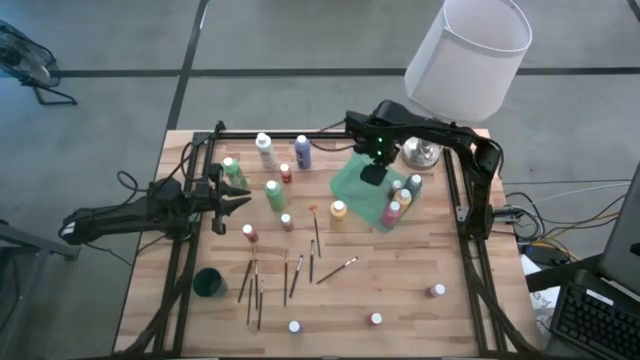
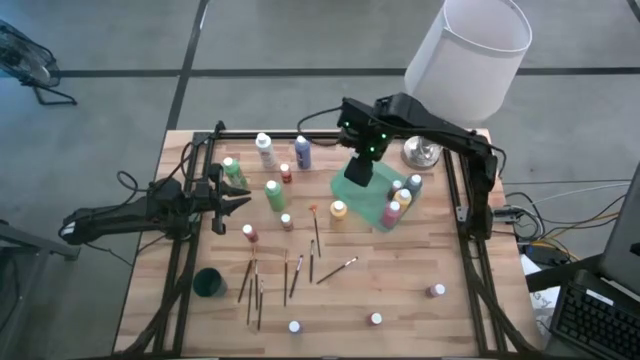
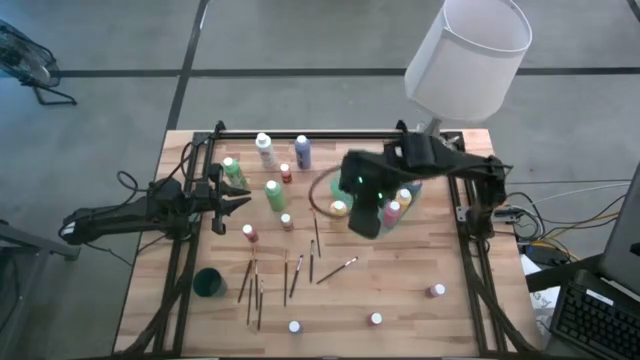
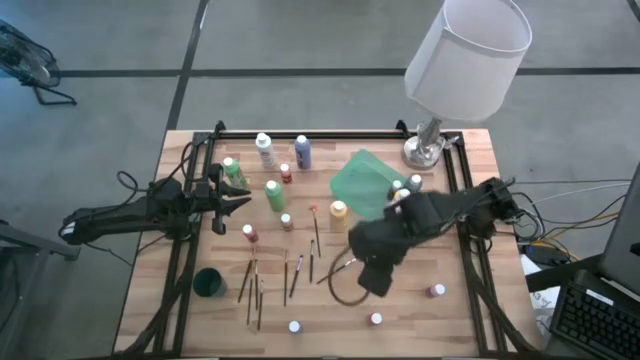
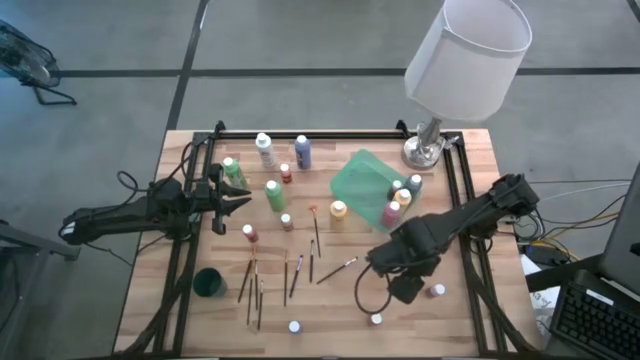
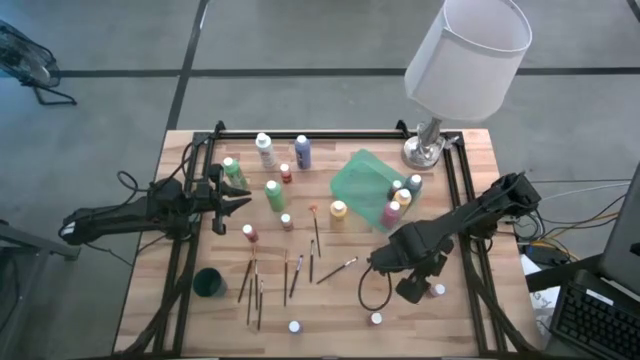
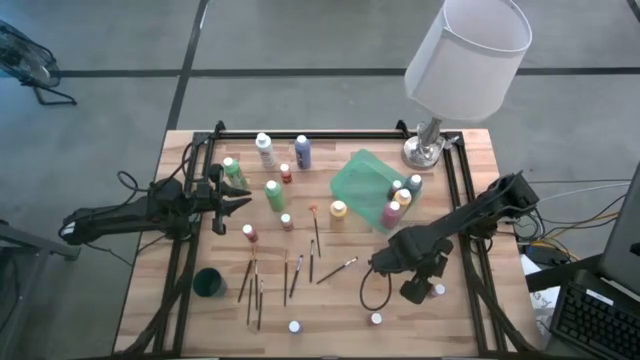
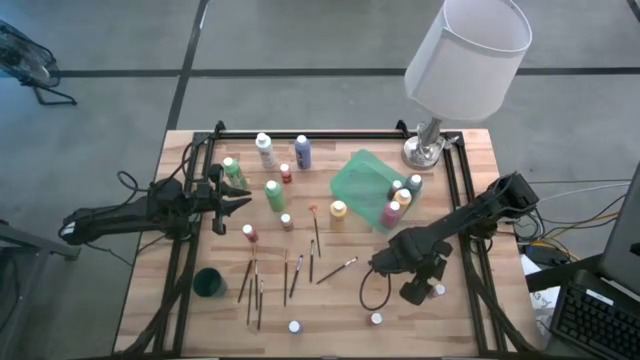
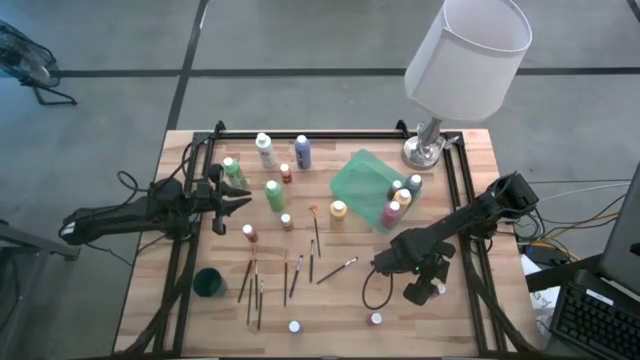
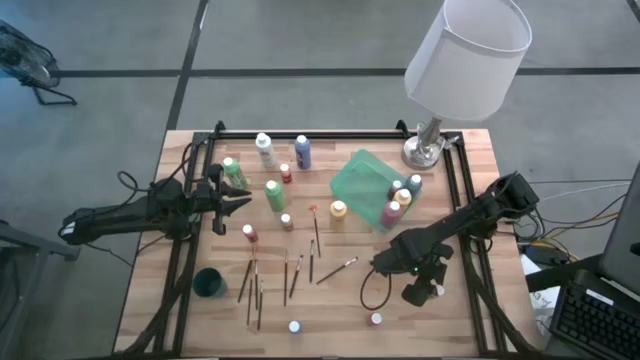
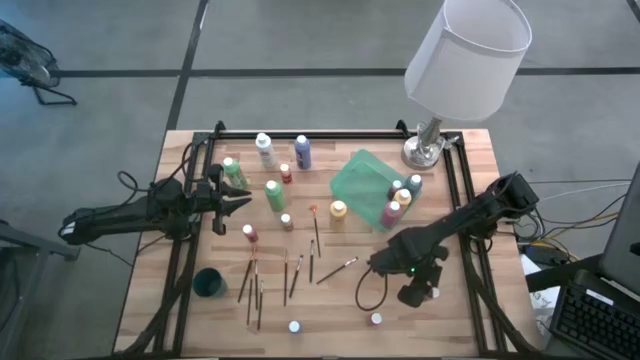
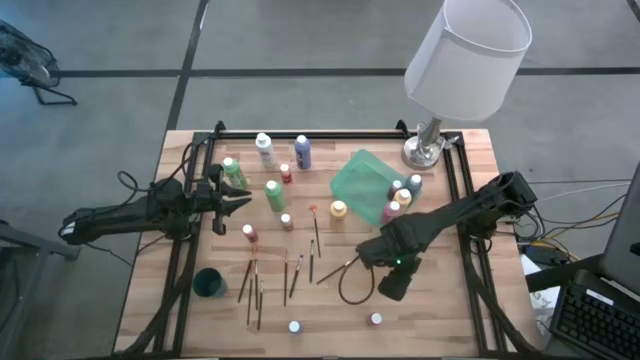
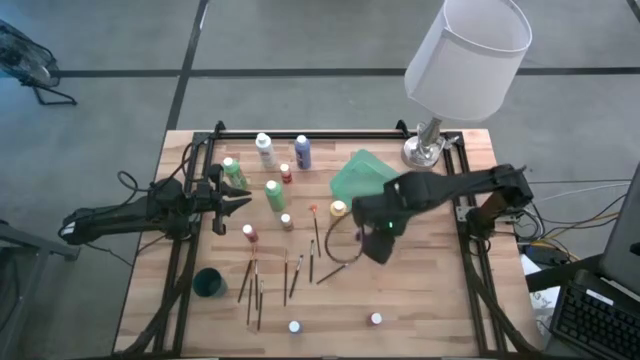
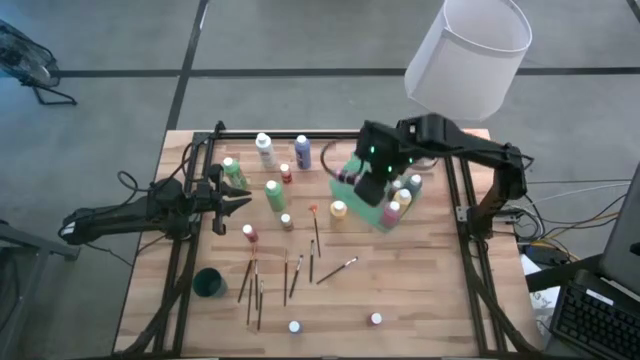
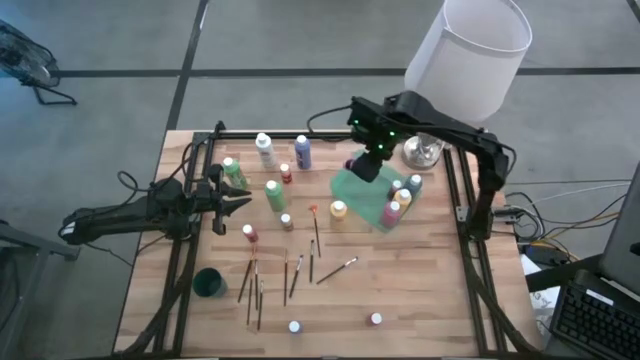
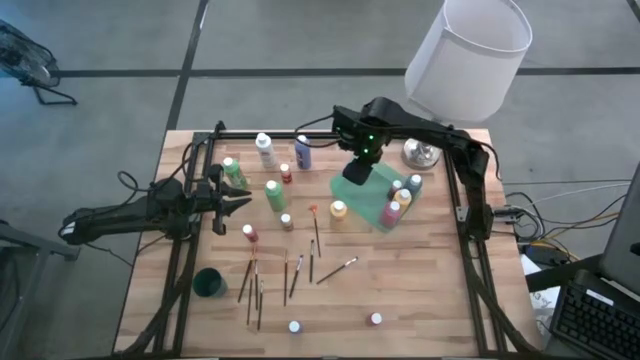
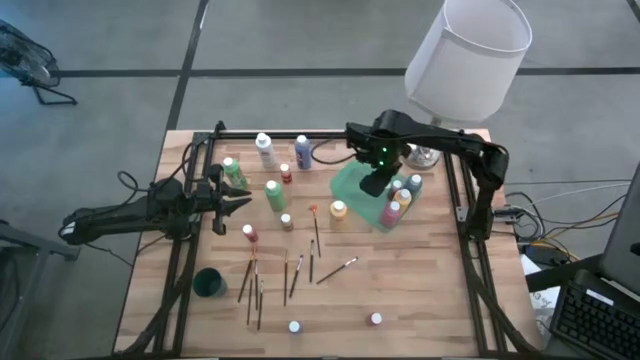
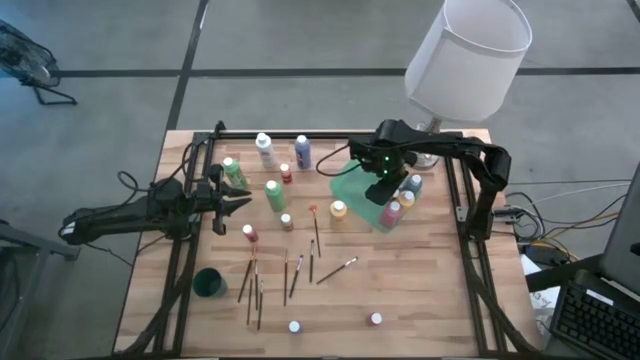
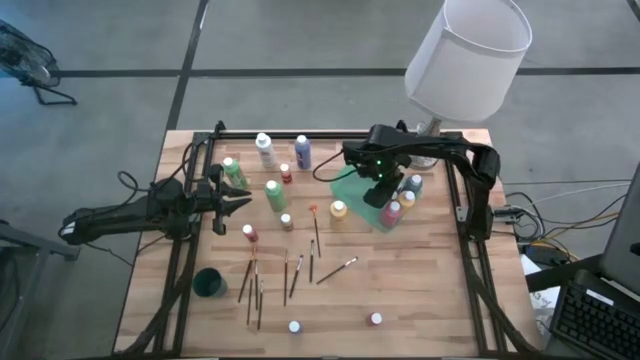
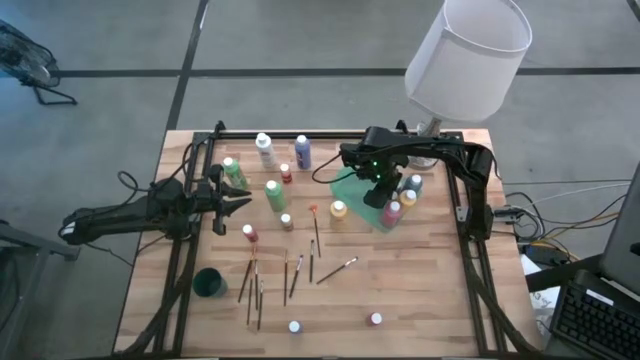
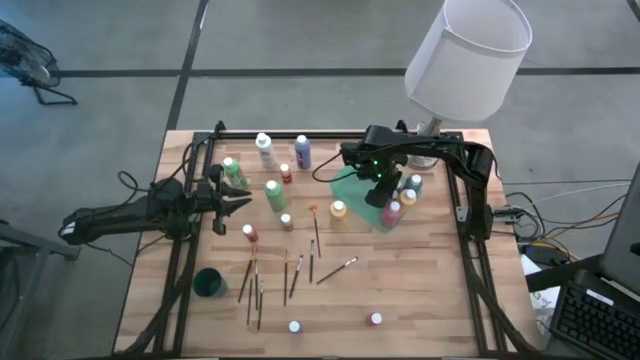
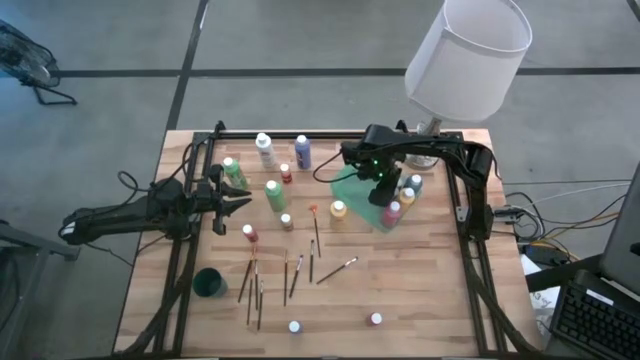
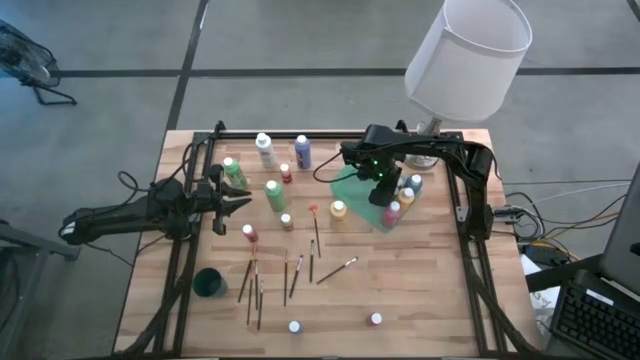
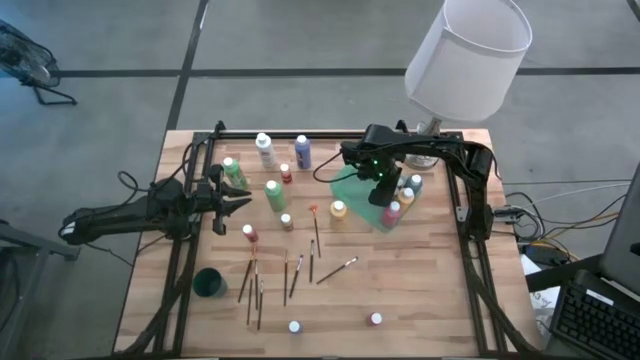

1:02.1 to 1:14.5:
Task: Pick & Place Paint Supplies
Put the small light pink paint bottle into the green bin

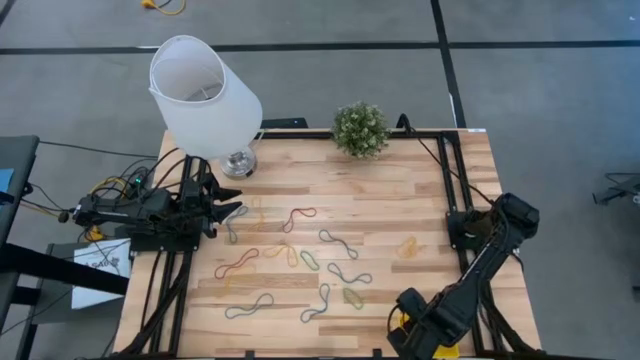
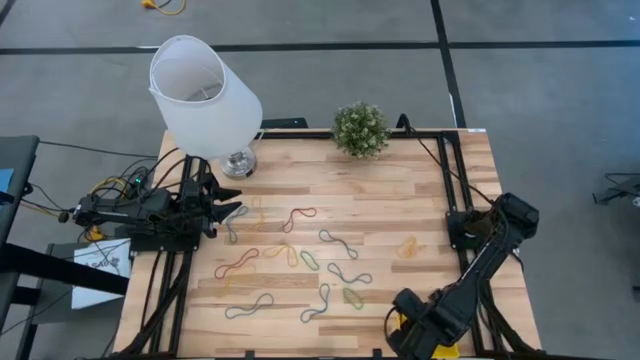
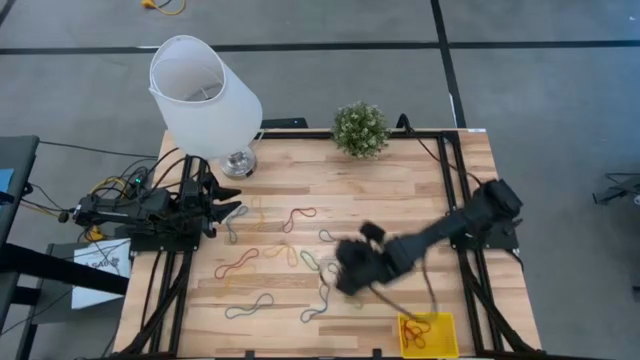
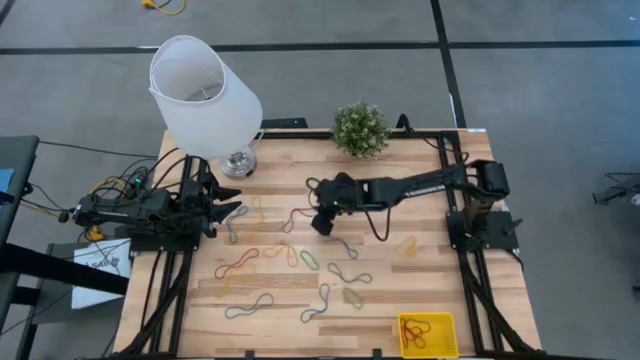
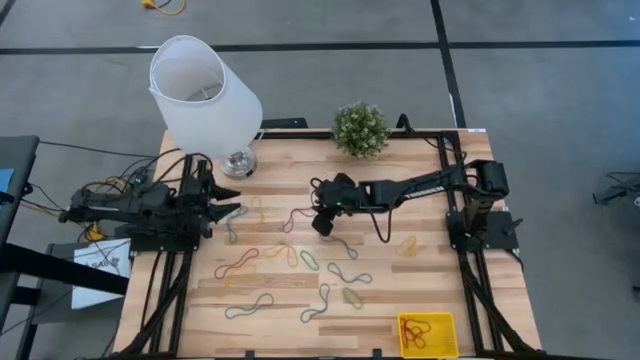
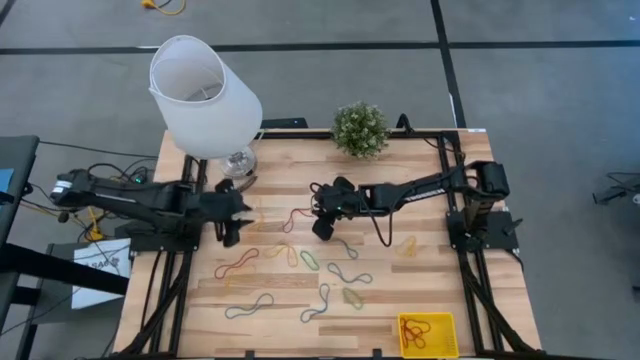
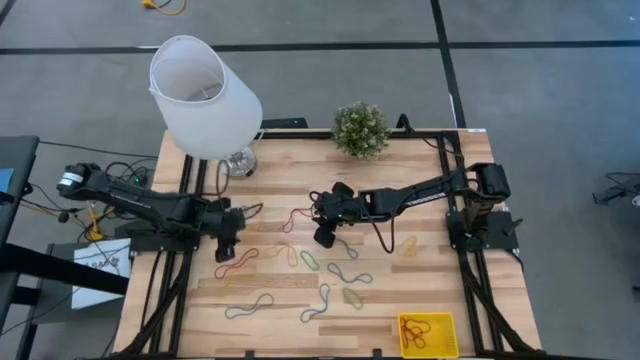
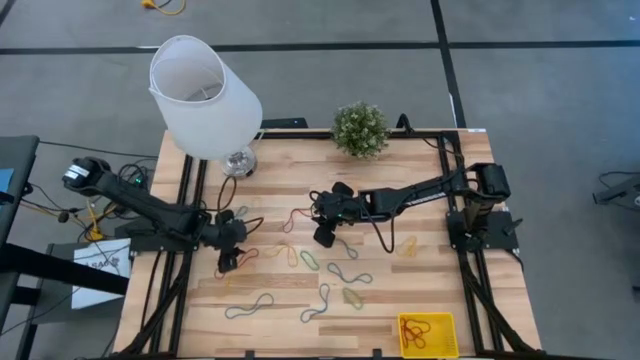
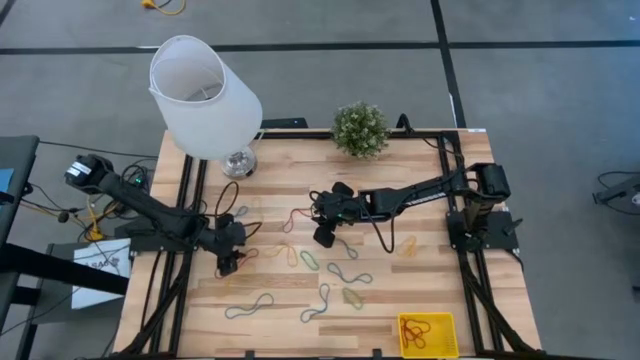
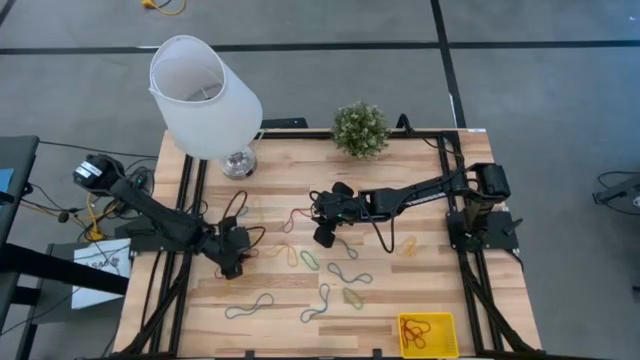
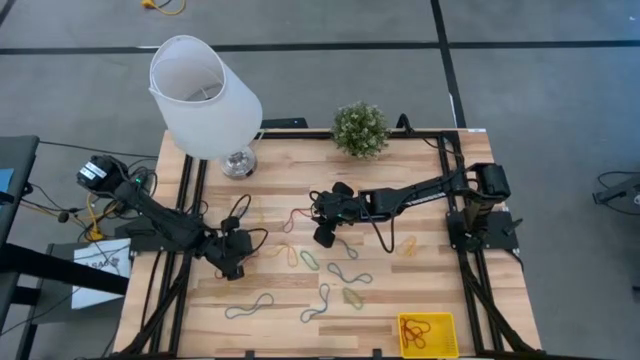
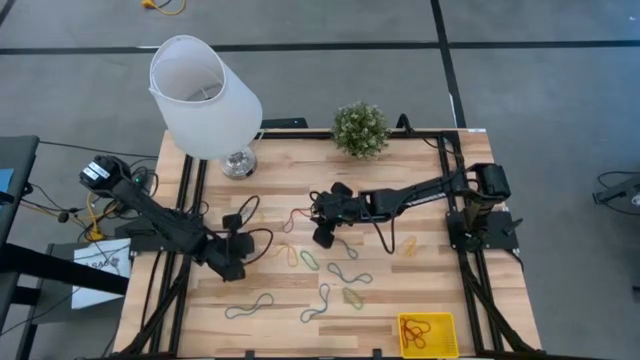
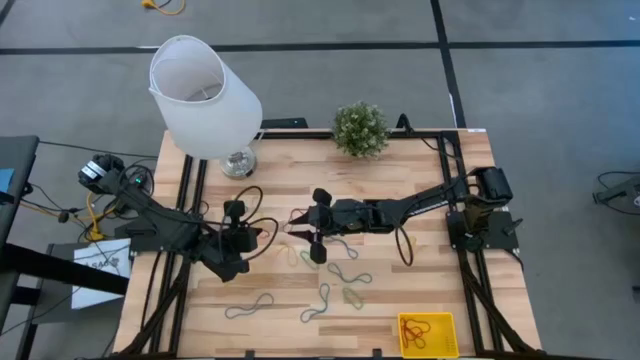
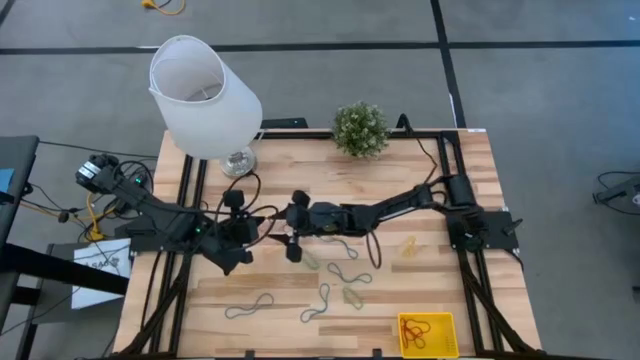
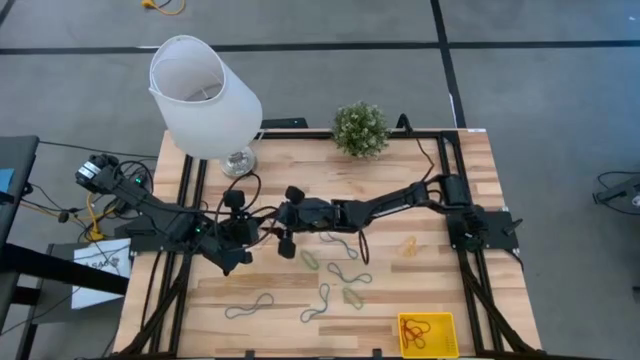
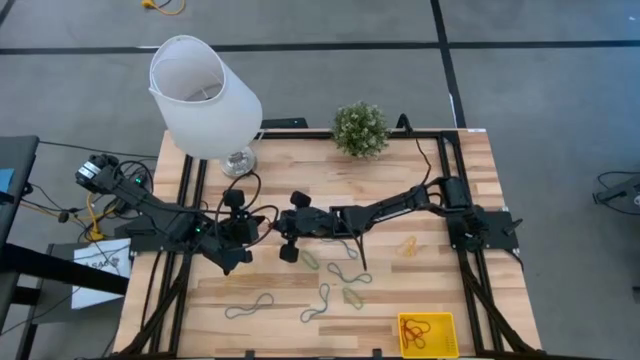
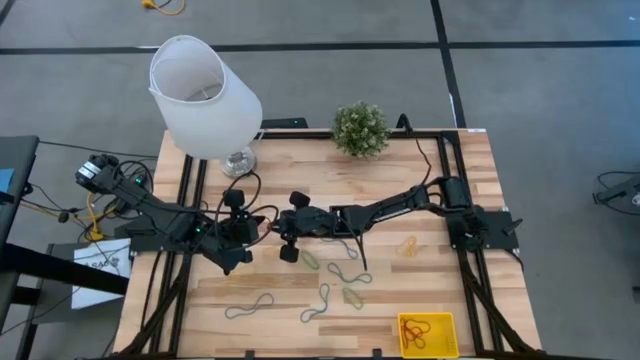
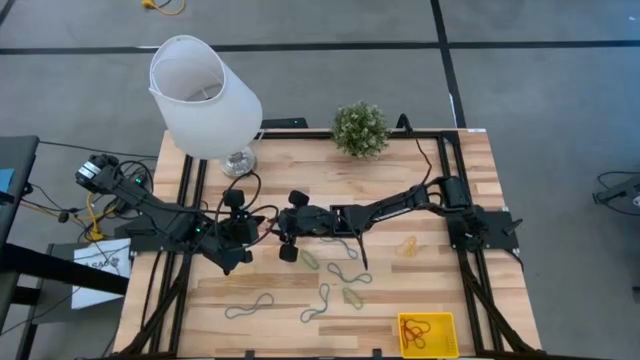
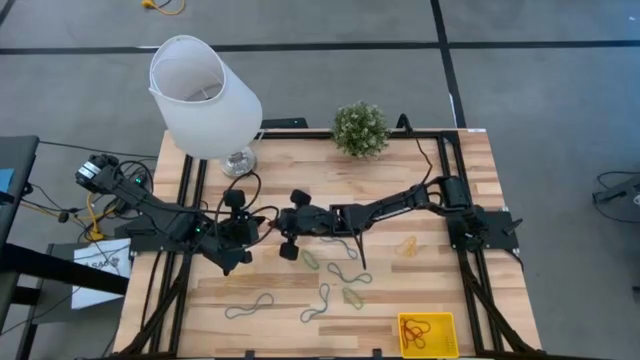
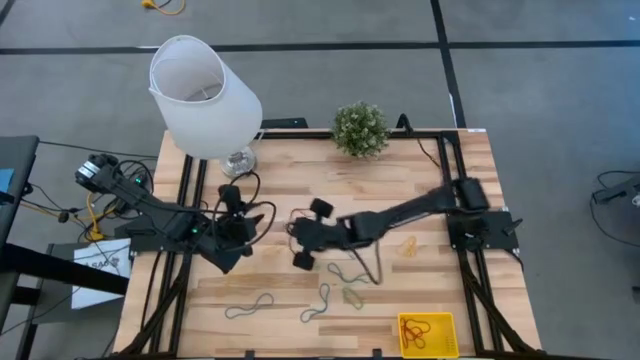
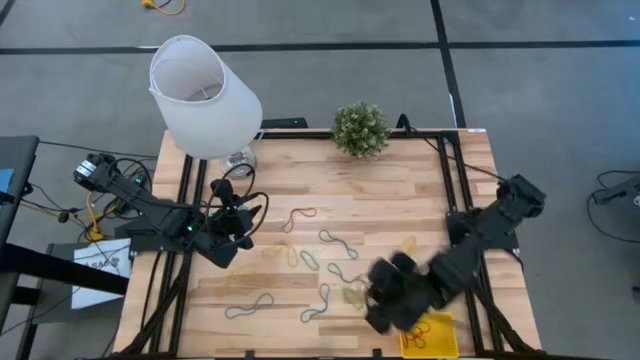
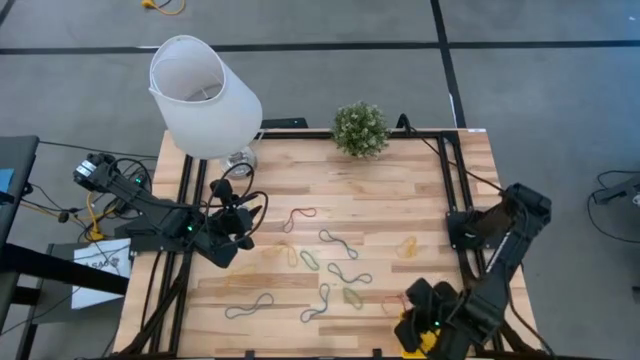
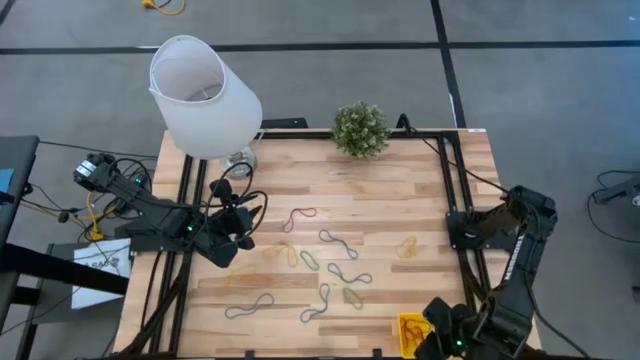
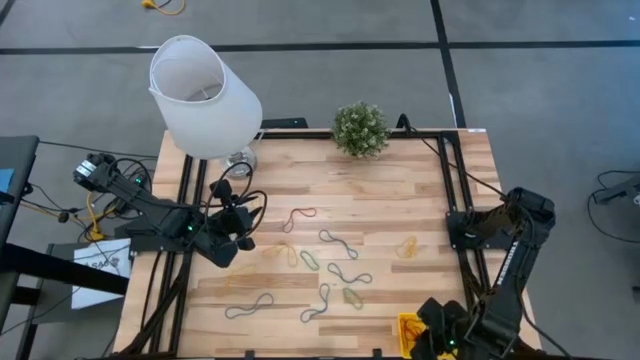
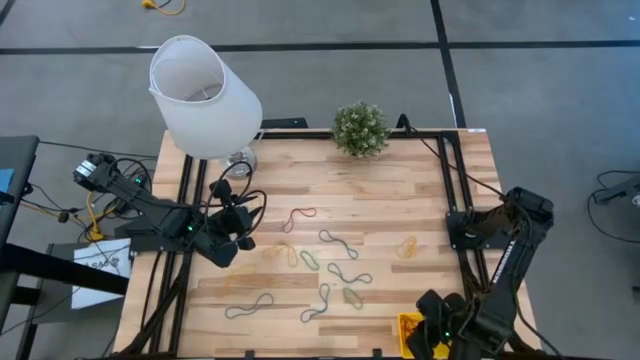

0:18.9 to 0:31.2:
Task: Pick and place rubber bands into bin
Put the red rubber band into the yellow basket
